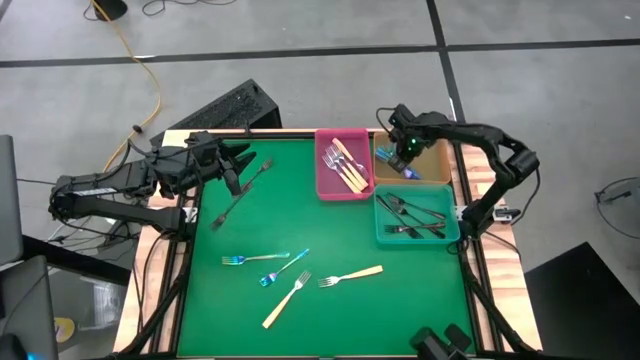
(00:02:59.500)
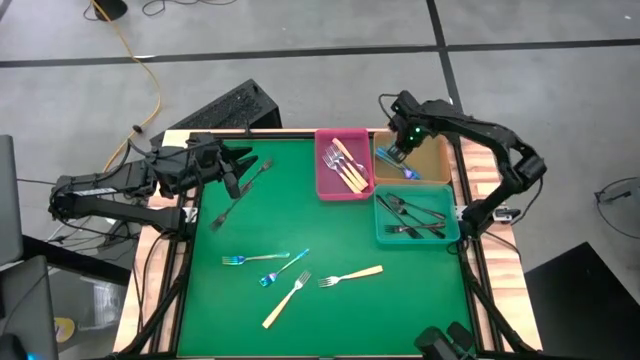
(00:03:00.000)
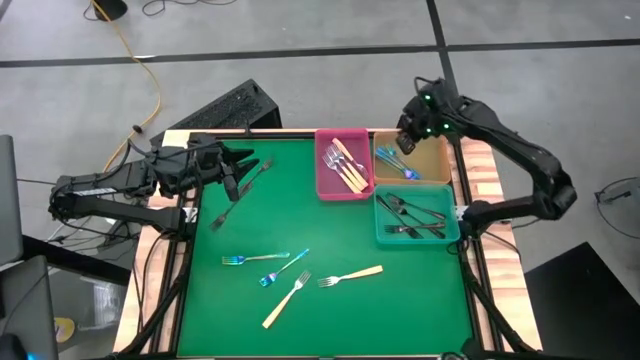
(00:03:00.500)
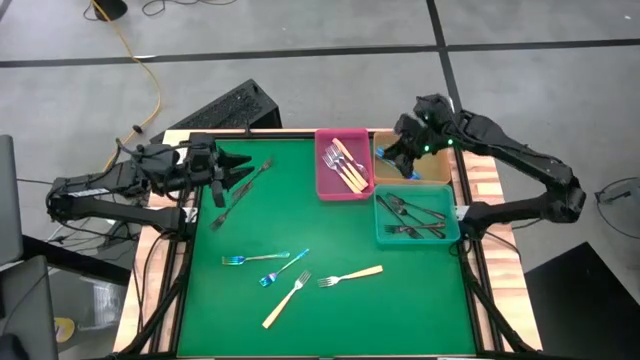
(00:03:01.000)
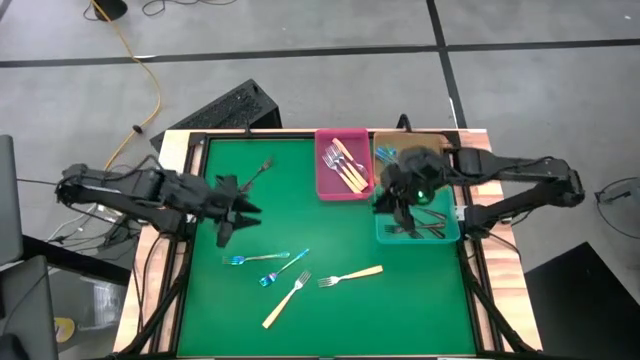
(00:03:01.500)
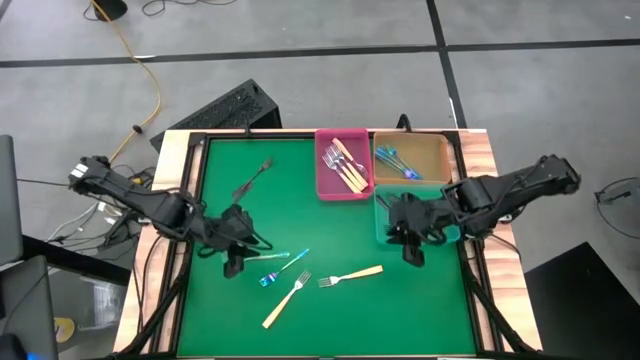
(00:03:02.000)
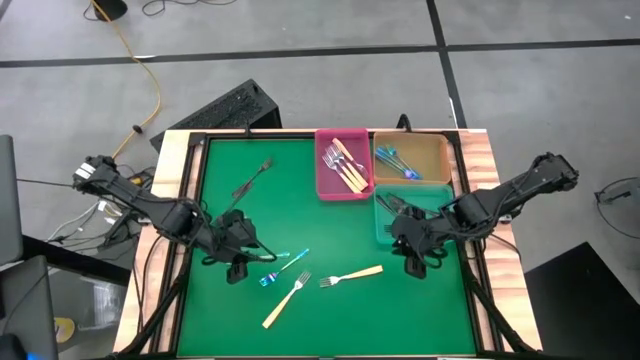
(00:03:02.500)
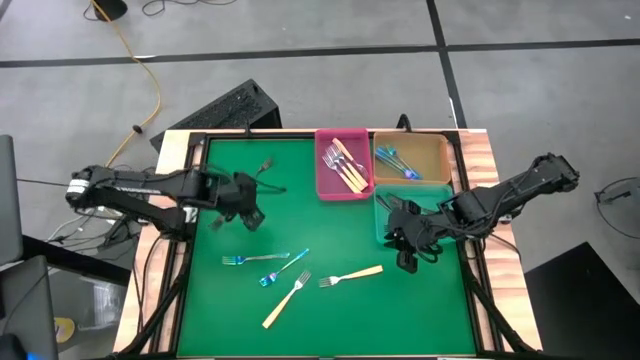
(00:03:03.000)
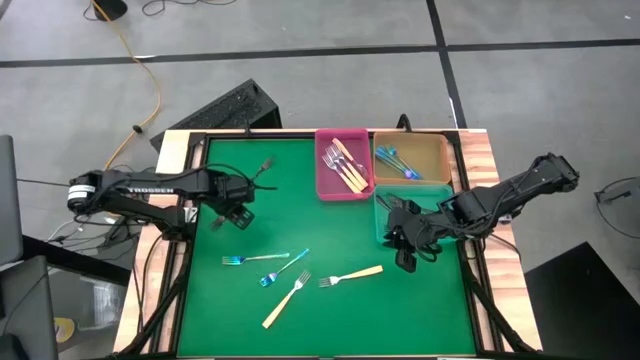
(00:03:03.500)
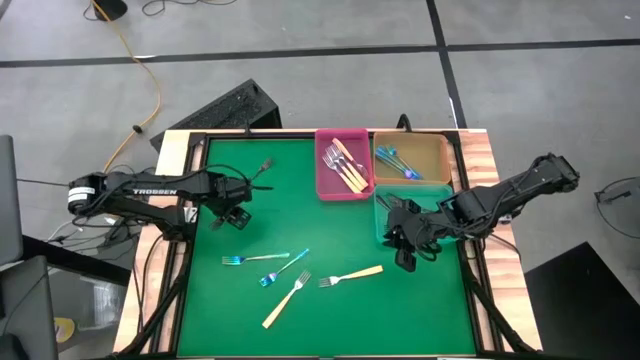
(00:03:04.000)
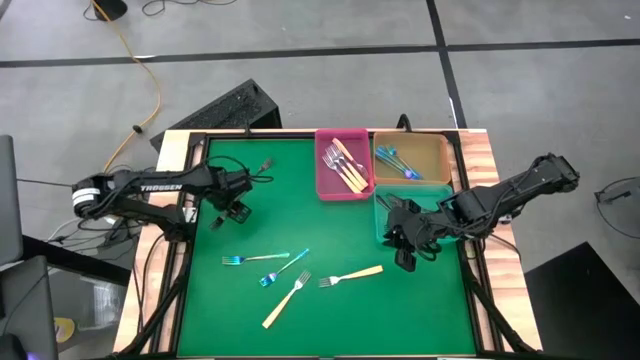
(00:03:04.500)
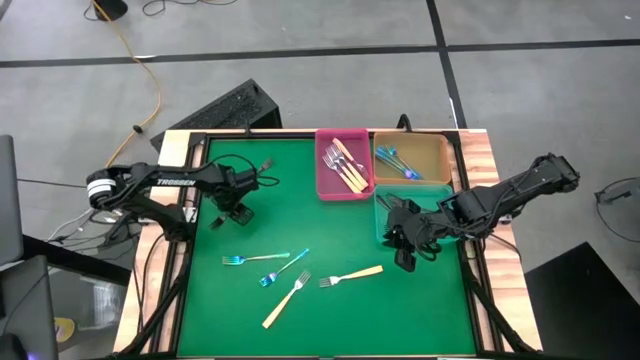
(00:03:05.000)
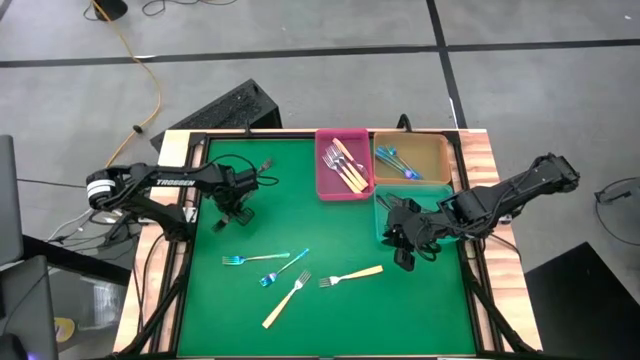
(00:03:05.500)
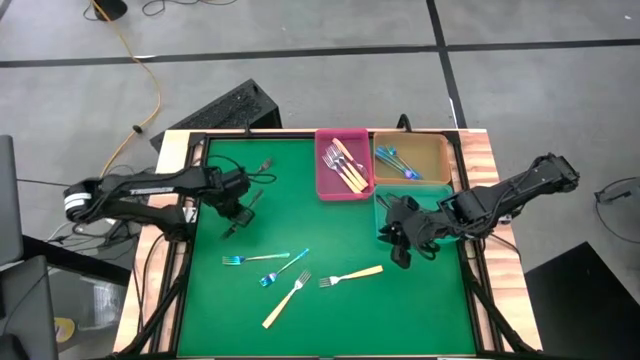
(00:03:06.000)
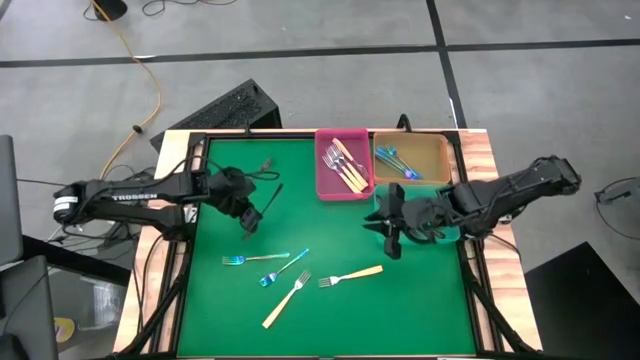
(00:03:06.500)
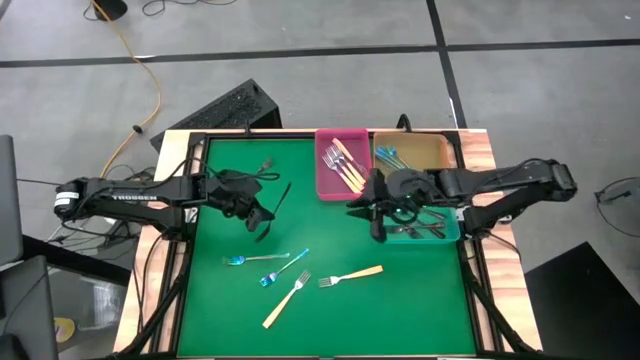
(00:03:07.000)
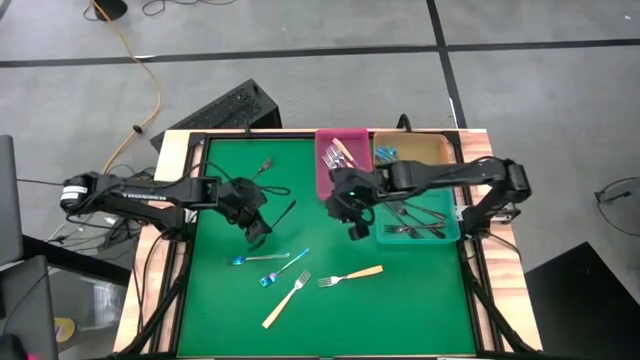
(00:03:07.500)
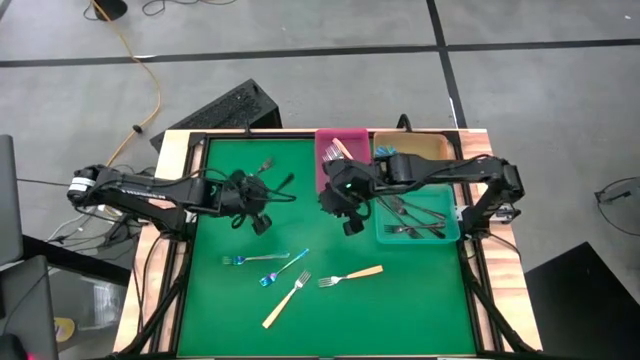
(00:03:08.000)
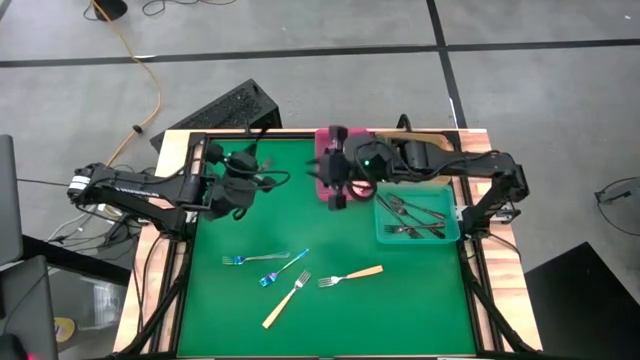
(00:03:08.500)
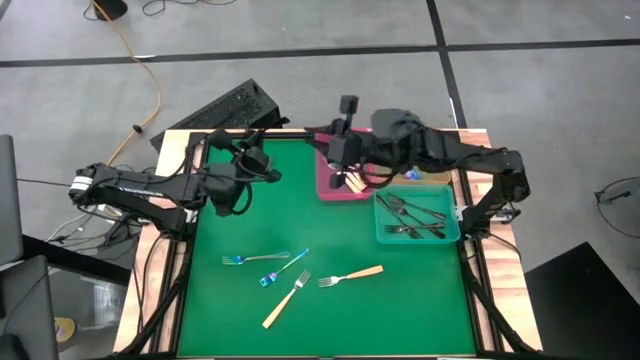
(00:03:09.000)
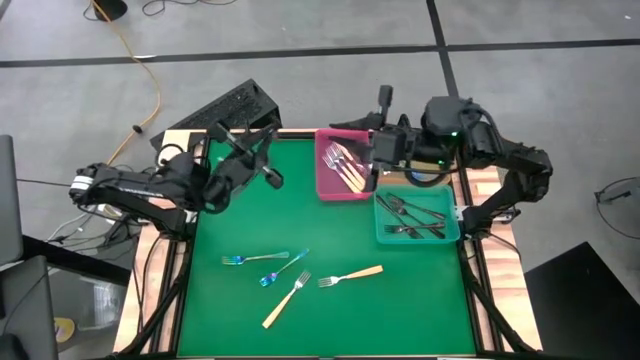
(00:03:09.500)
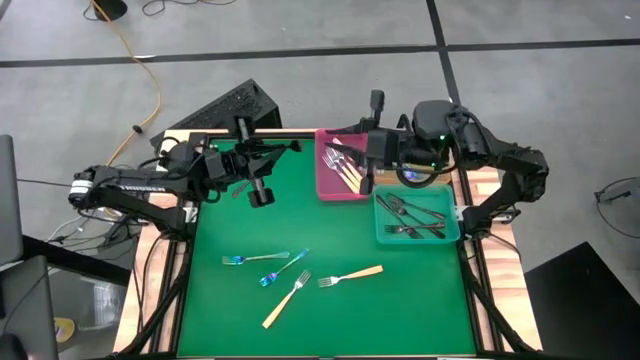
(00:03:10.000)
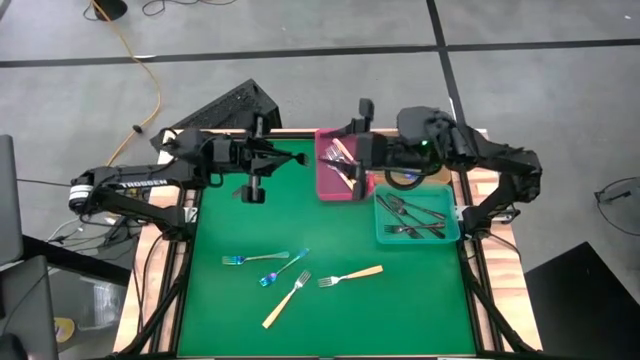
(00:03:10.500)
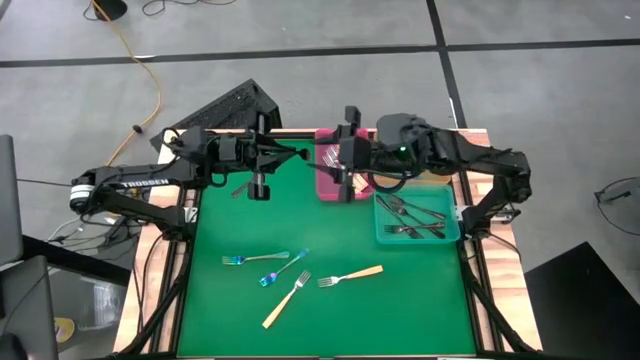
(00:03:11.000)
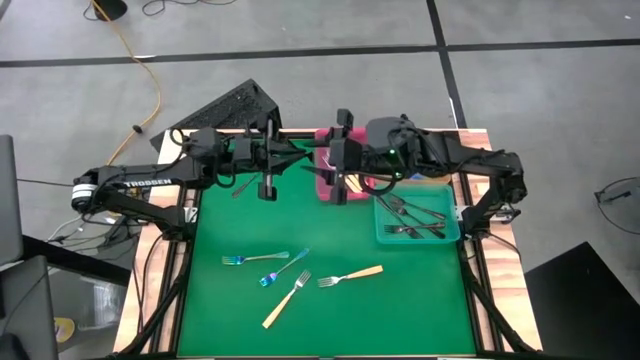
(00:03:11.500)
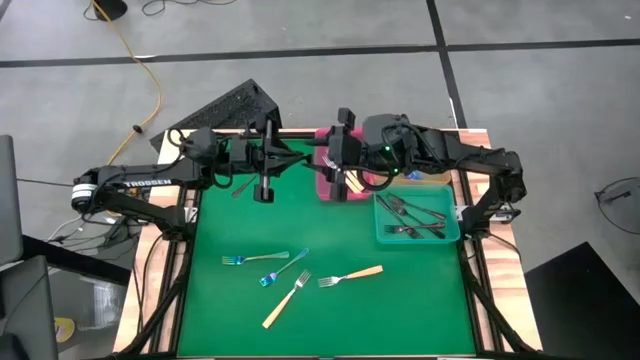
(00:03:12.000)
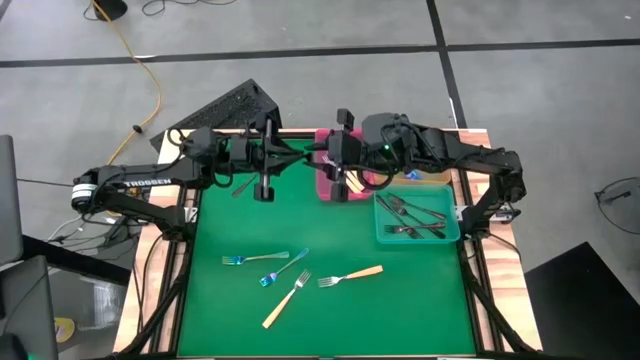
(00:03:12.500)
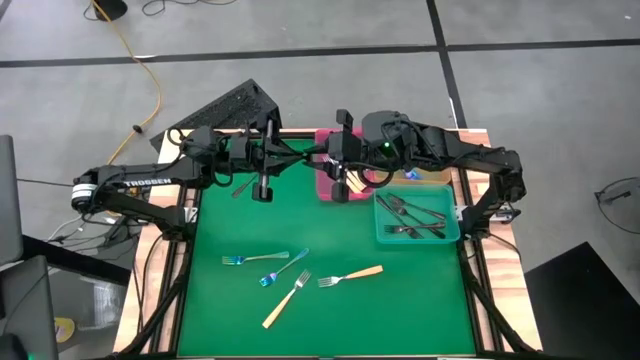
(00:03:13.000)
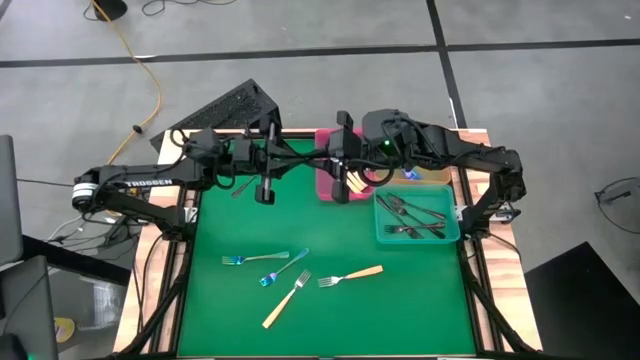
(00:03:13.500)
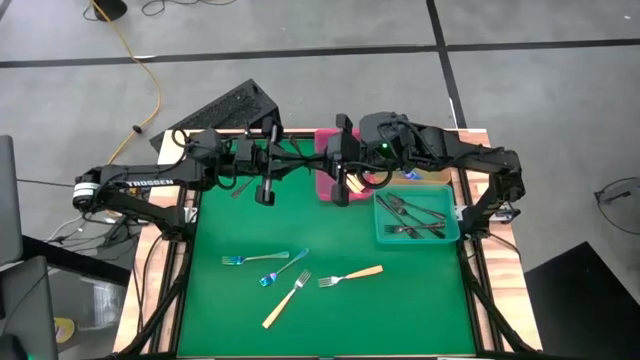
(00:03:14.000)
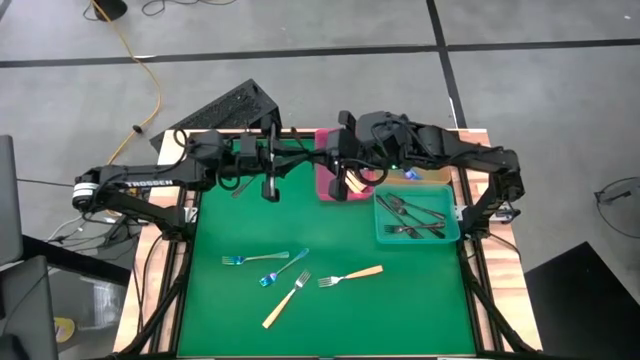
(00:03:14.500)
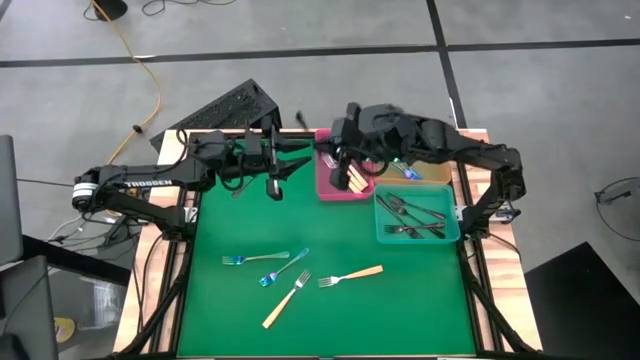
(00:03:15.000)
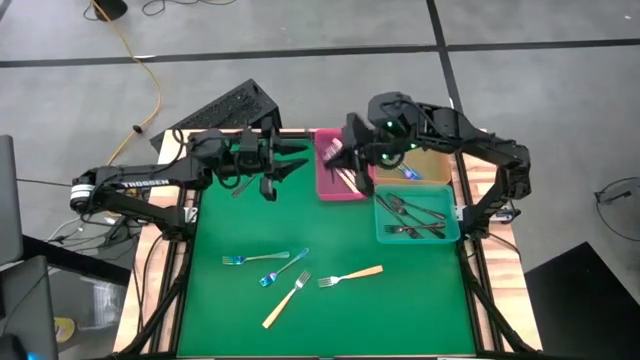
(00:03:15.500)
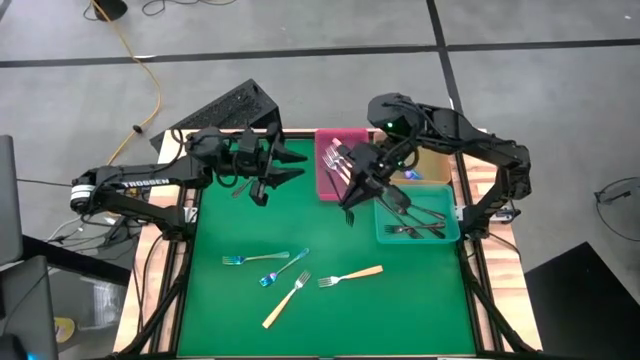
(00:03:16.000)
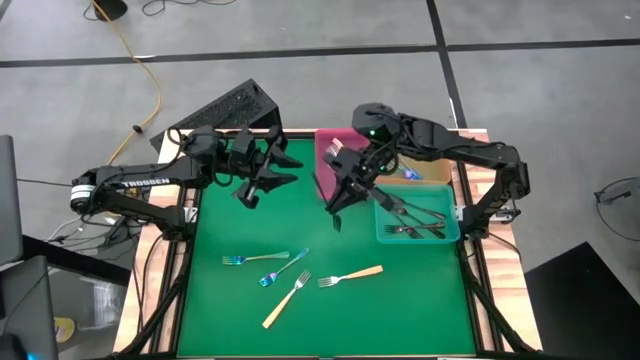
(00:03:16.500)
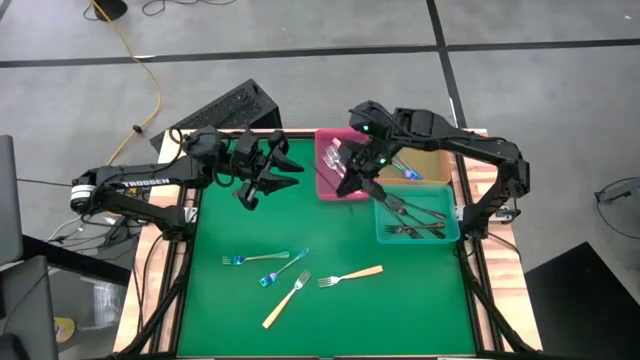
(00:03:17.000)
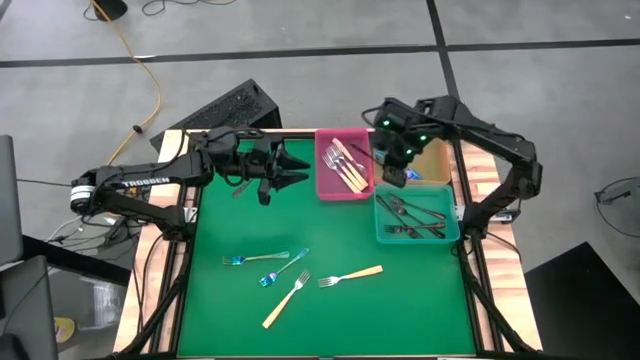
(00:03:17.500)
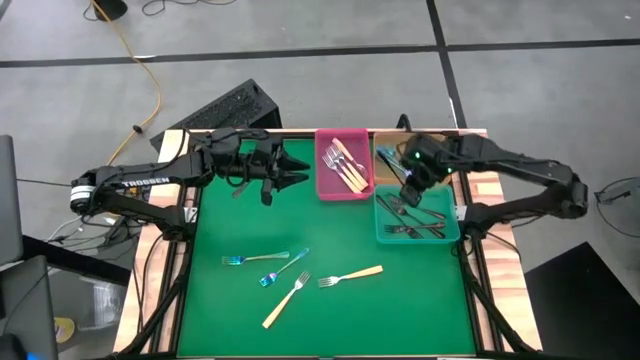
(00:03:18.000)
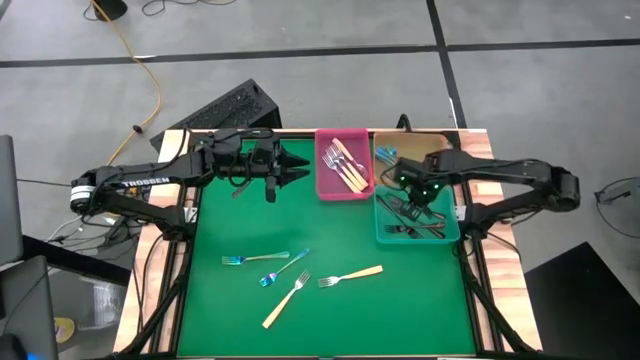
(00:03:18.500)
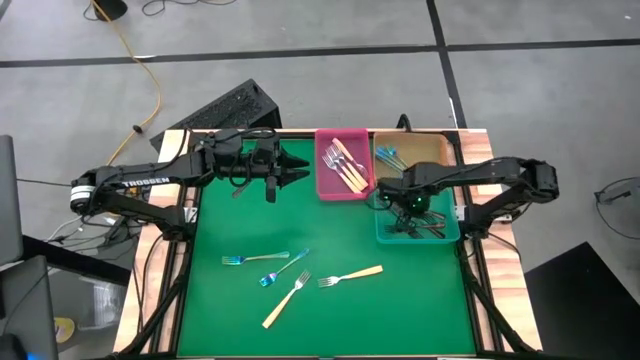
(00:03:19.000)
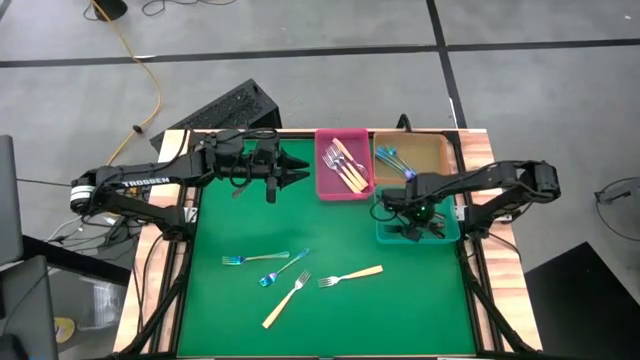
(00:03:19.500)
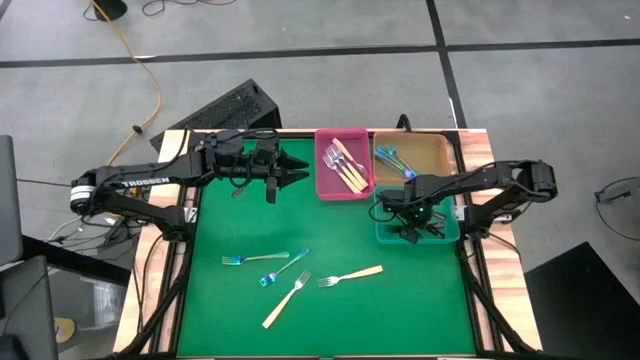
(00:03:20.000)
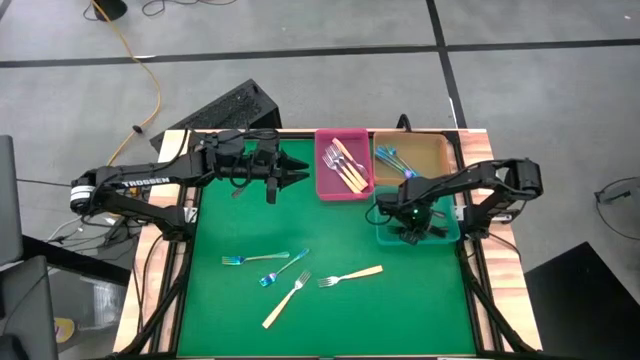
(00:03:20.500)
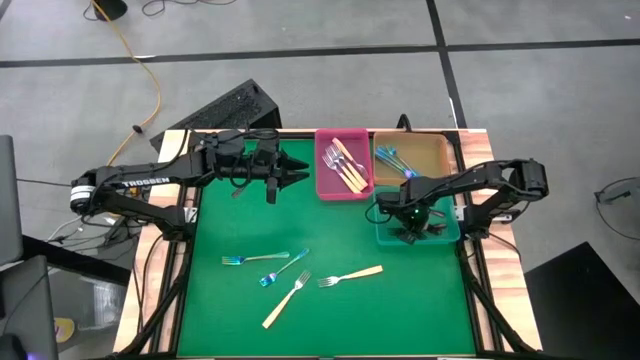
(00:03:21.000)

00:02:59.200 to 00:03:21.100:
Task: Sort silverware by color (type)
Put the black fork into the blue bin
